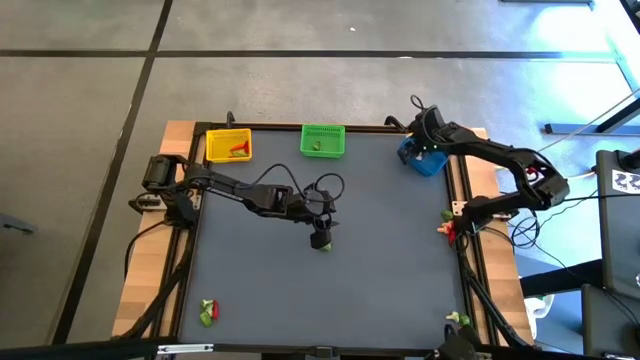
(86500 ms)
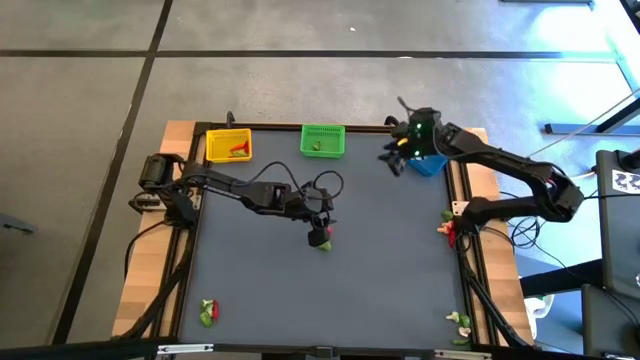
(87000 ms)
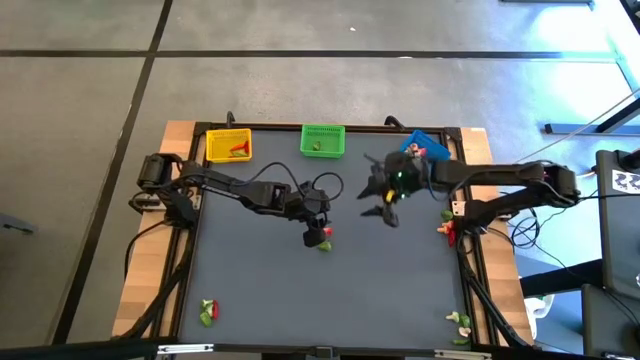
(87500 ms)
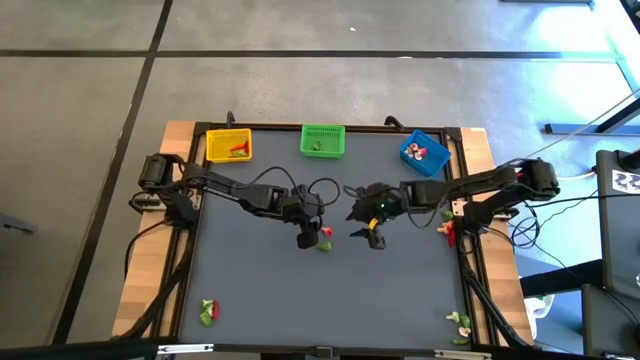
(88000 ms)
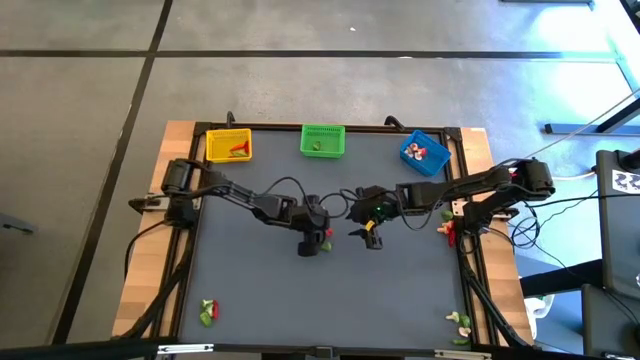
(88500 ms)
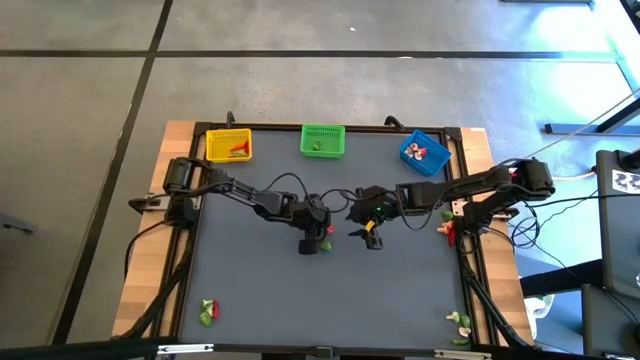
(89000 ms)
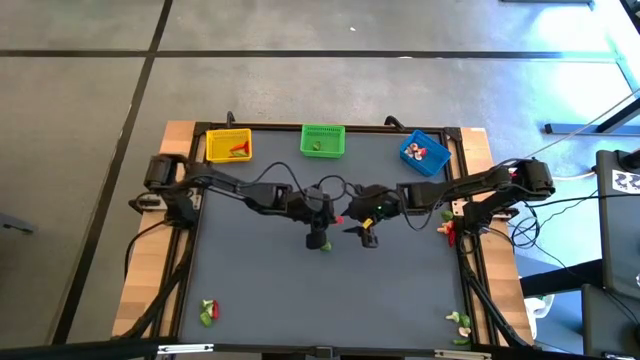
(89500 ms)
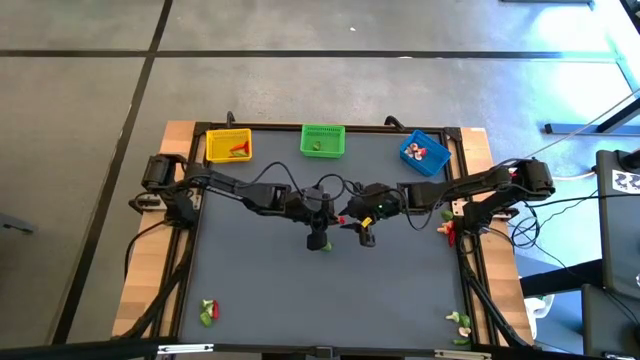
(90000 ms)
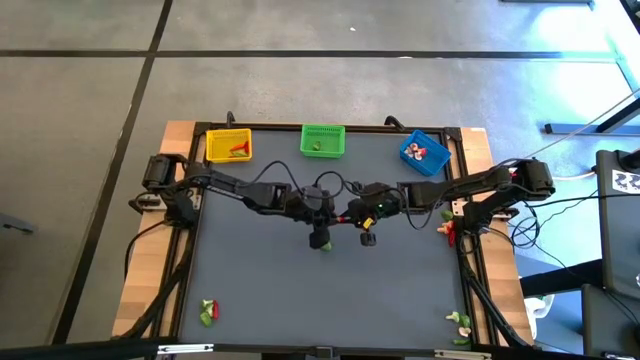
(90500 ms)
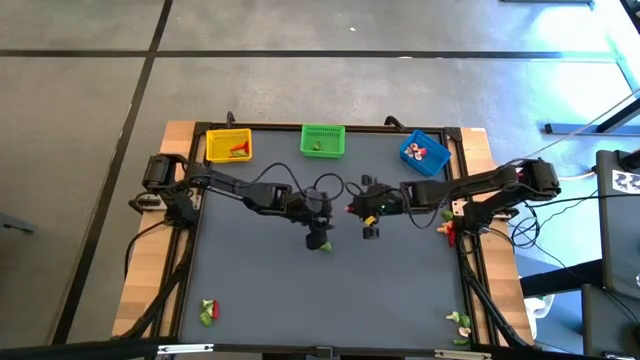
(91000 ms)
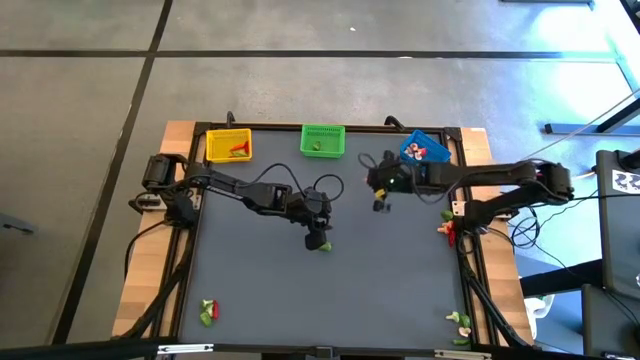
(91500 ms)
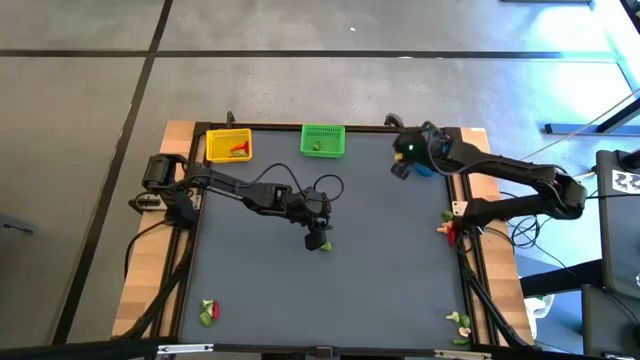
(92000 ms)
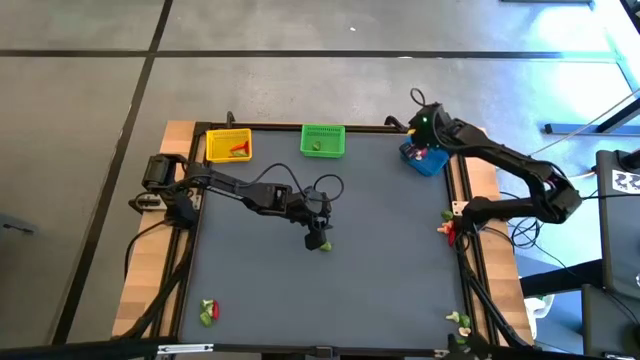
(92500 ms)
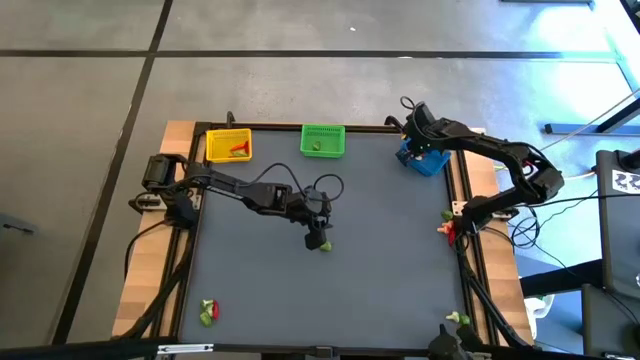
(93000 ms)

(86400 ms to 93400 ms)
Task: Sort produce into baskets
Put the red mushroom into the blue basket

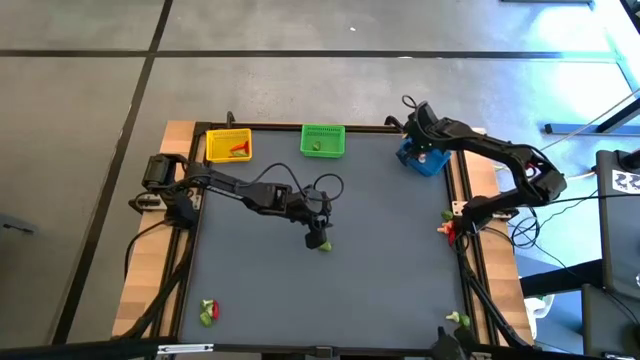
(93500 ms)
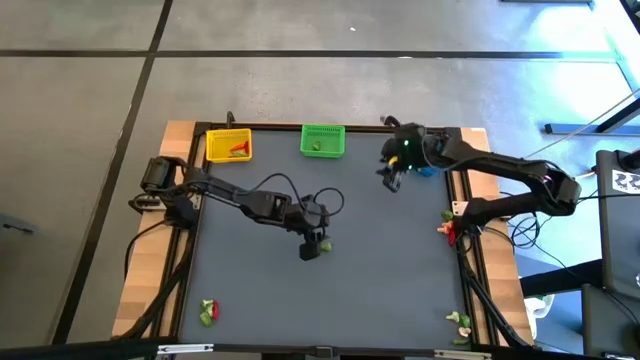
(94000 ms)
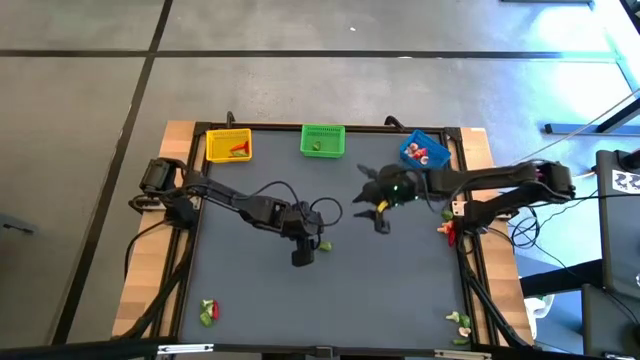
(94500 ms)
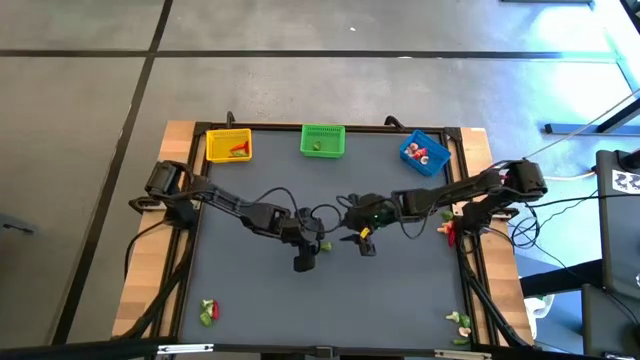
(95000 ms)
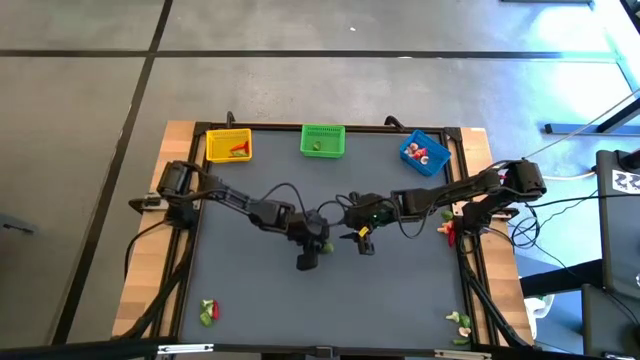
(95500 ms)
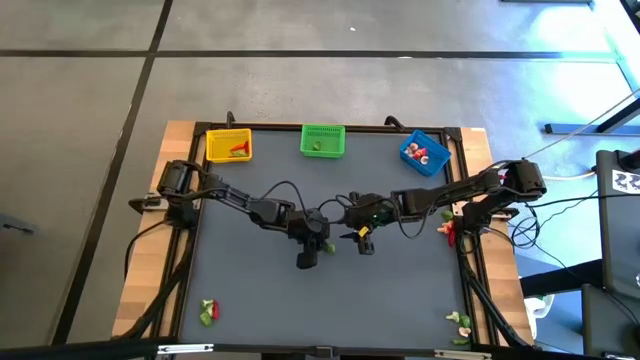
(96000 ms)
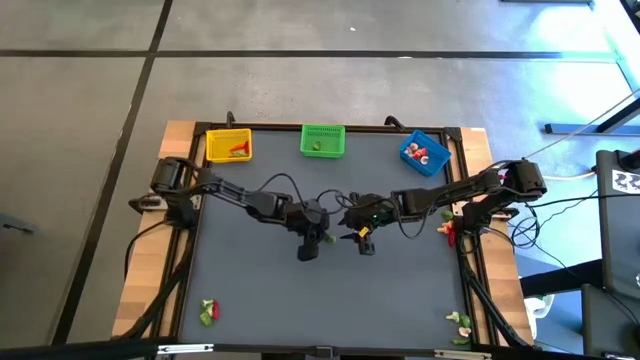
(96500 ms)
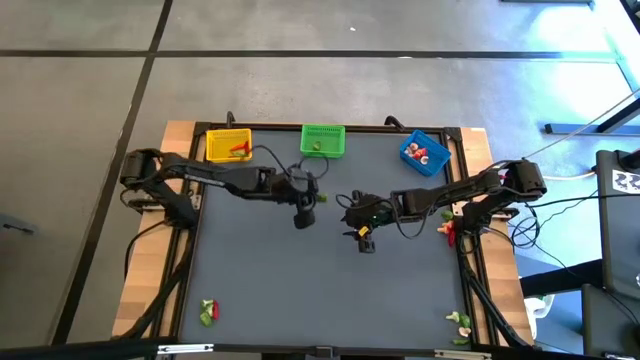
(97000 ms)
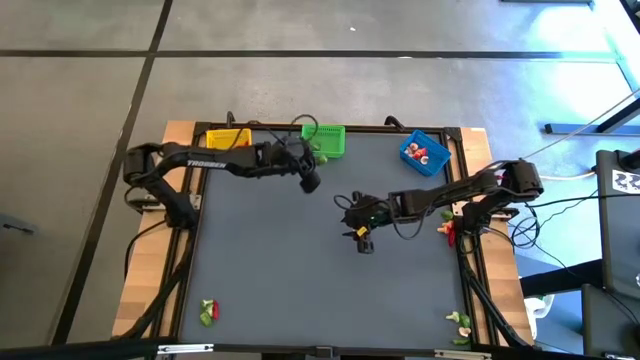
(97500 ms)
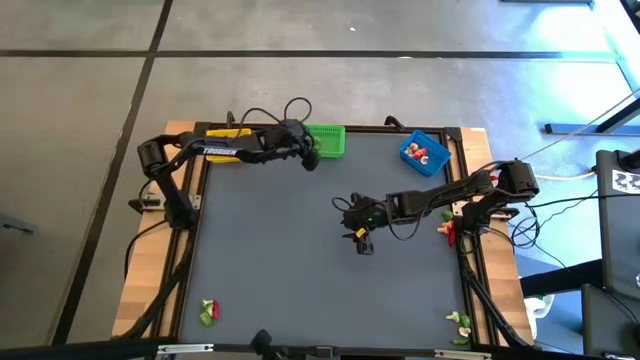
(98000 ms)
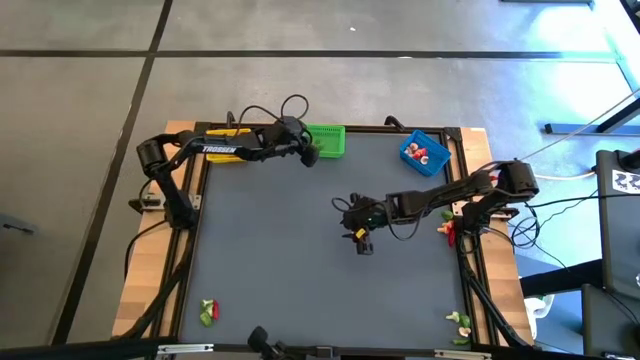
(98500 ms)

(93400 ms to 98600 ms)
Put the small green chili pepper into the green basket

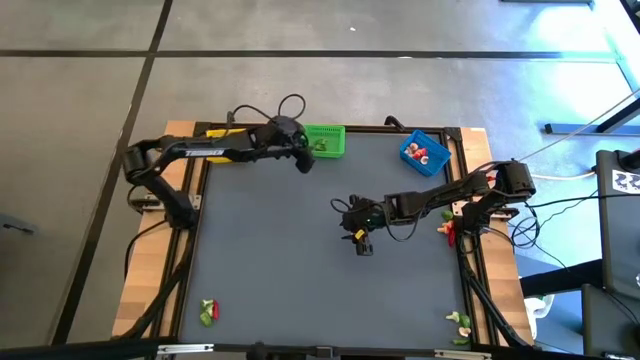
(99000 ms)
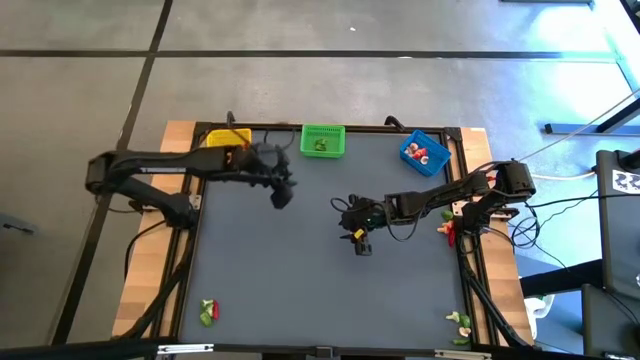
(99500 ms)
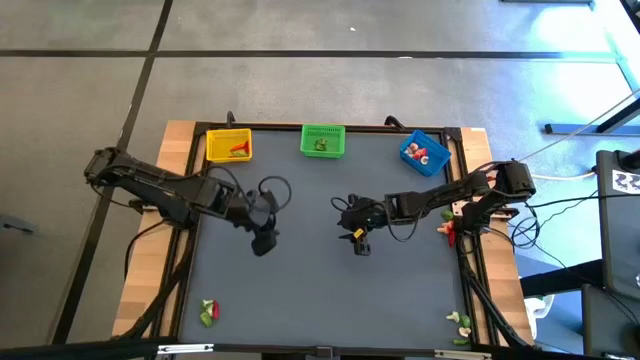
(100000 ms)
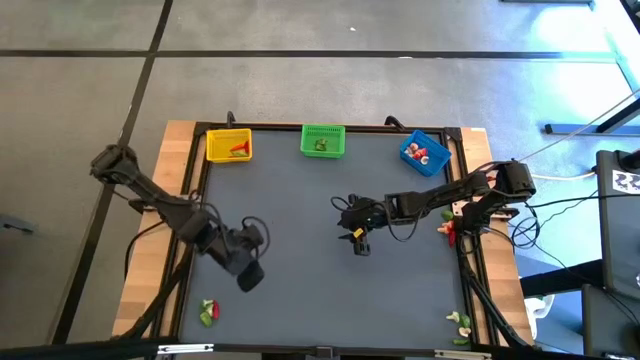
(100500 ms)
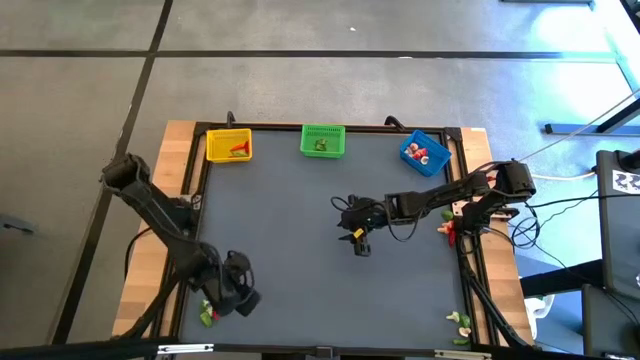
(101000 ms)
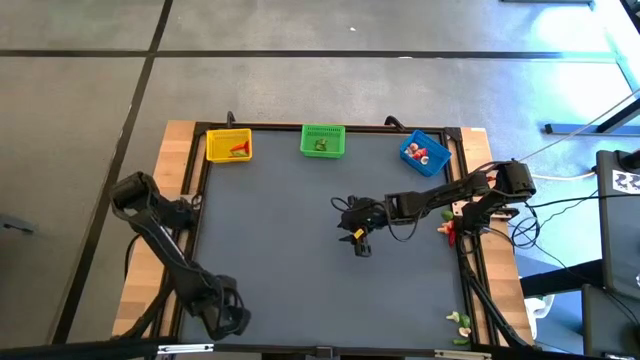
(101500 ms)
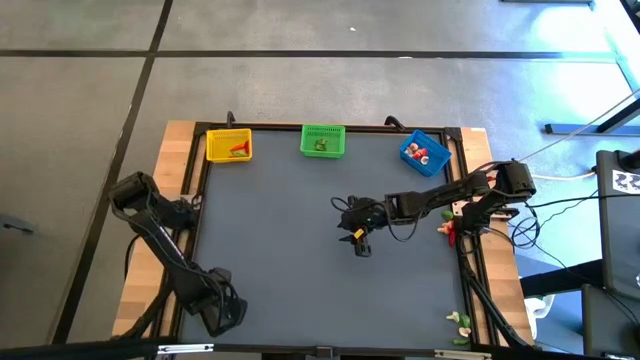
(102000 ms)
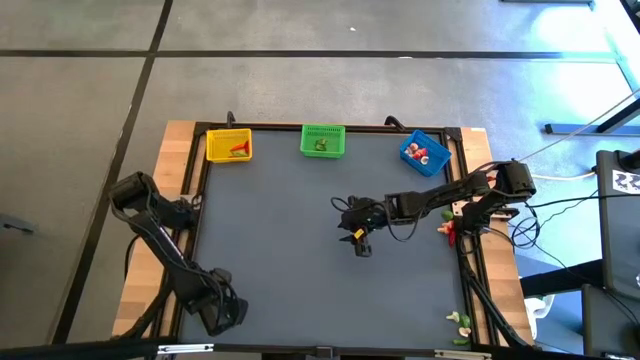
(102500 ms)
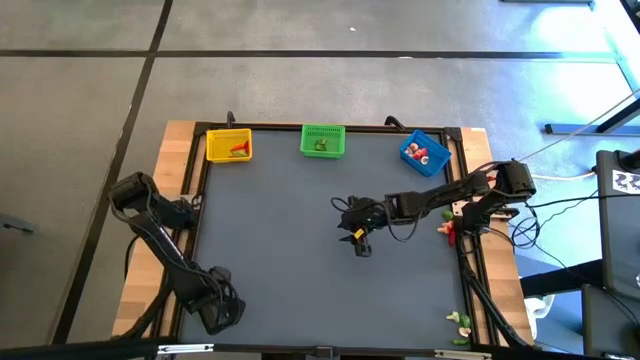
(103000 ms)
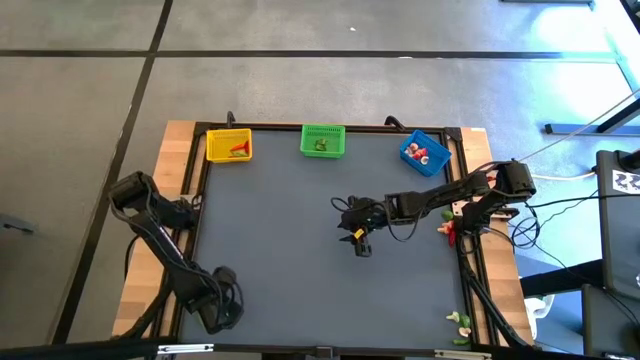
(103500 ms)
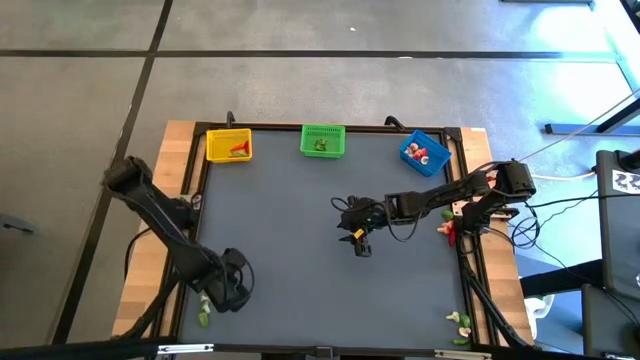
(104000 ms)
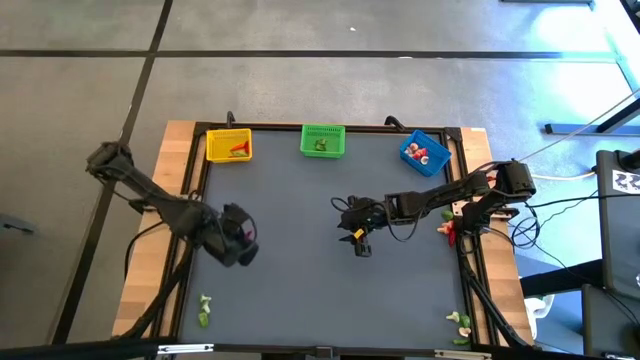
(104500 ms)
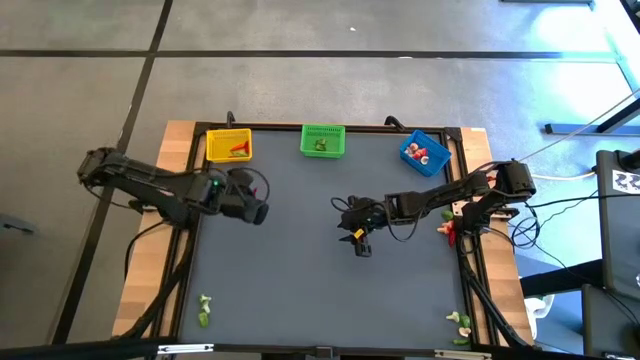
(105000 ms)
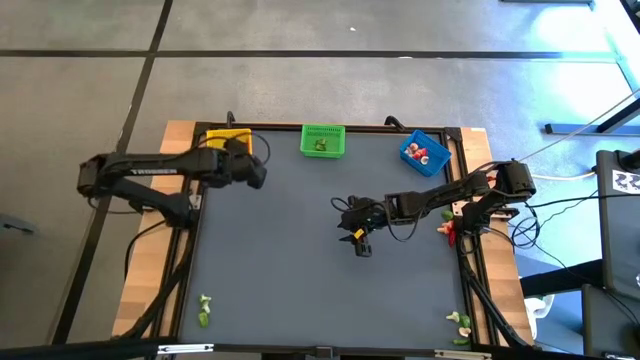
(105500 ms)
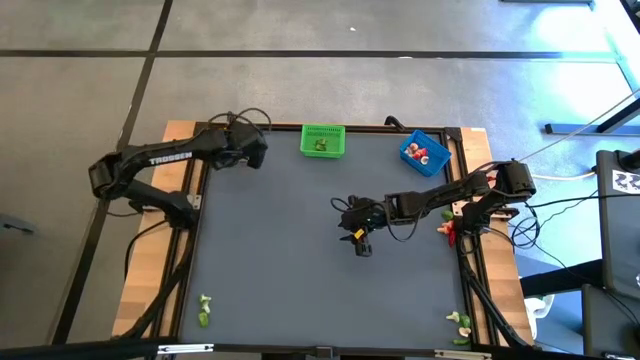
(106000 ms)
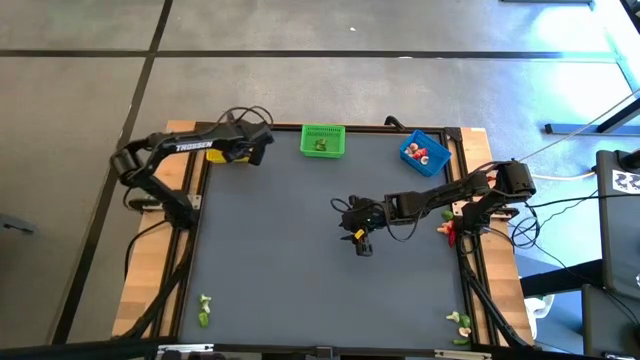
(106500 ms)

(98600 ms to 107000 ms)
Put the red chili pepper into the yellow basket

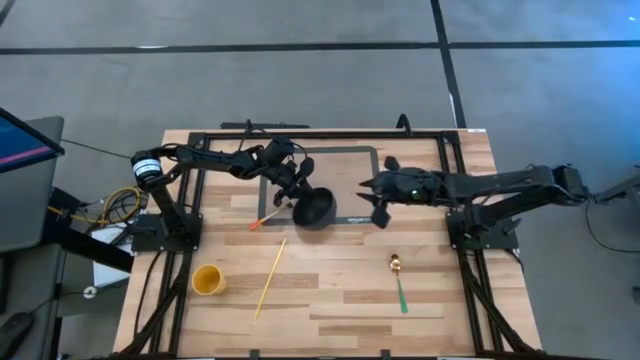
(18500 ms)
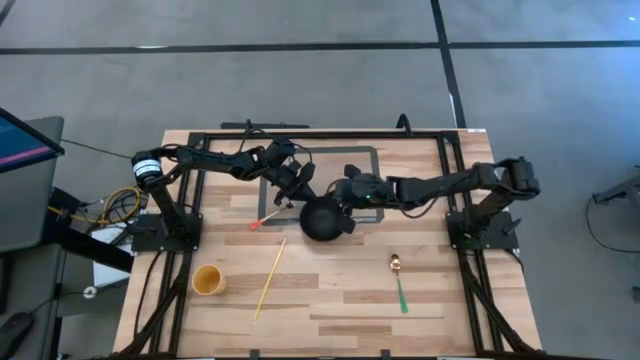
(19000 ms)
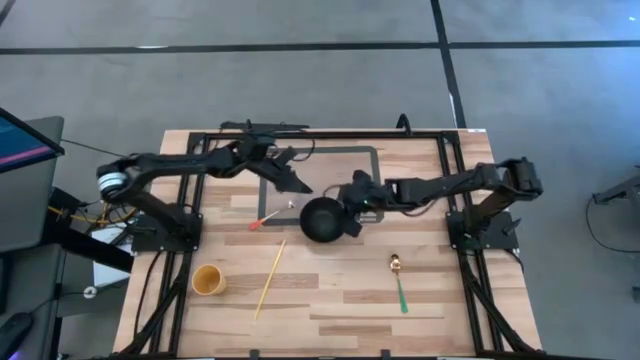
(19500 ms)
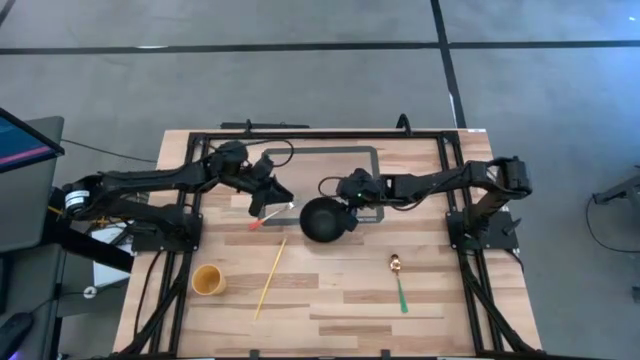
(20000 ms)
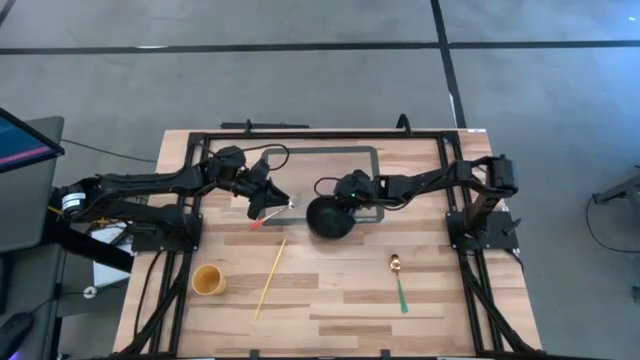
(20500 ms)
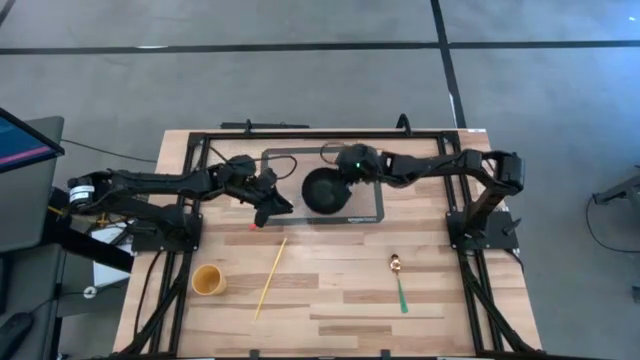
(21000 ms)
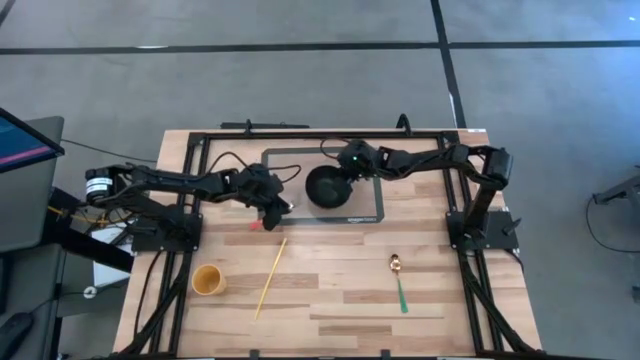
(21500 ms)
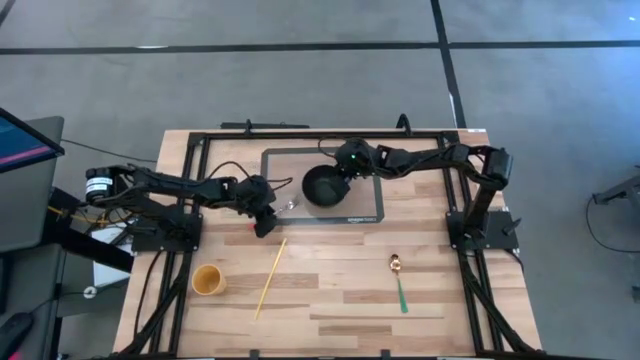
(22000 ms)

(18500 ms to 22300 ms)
Task: Pick & Place Utensil
Put the black bowl on the transparent silicone mat
